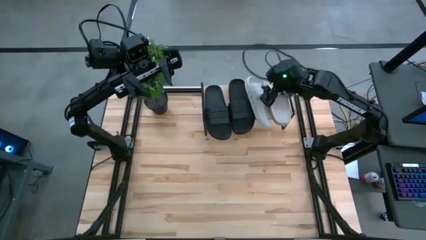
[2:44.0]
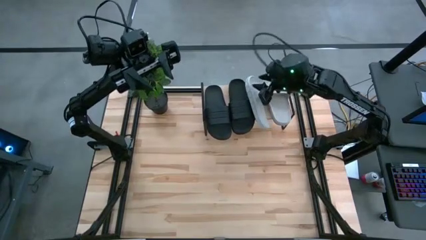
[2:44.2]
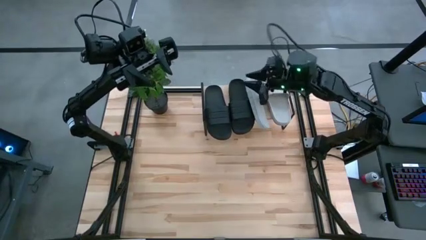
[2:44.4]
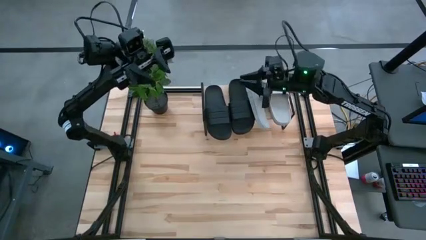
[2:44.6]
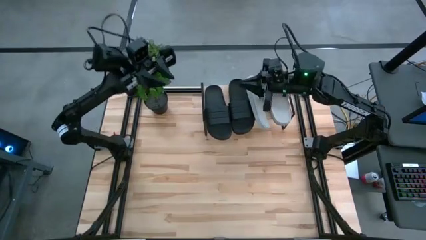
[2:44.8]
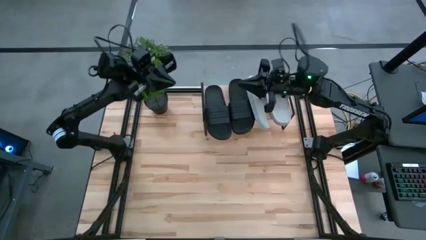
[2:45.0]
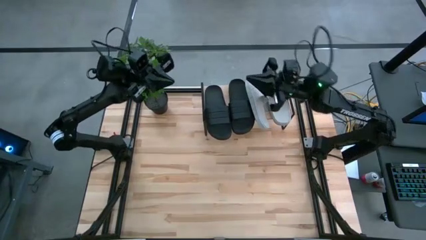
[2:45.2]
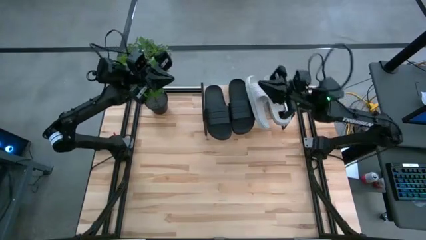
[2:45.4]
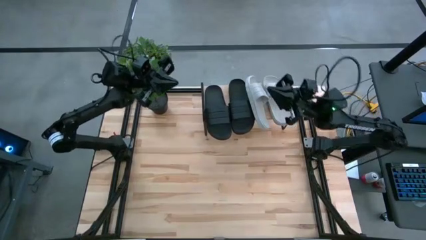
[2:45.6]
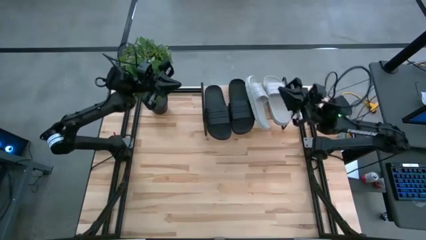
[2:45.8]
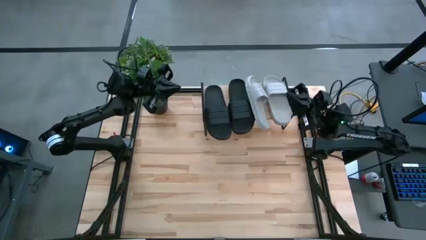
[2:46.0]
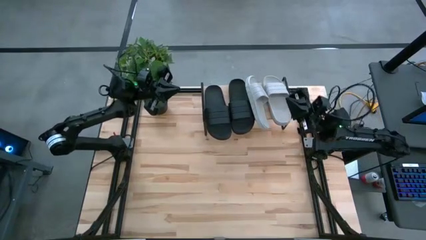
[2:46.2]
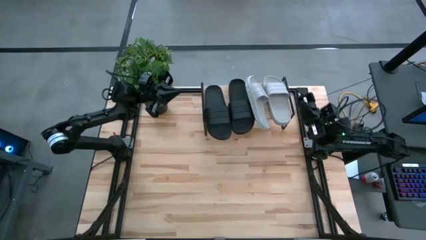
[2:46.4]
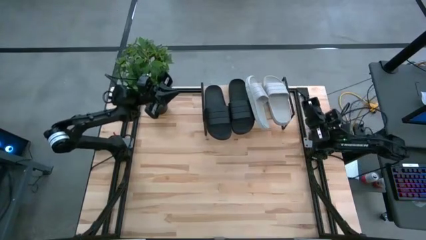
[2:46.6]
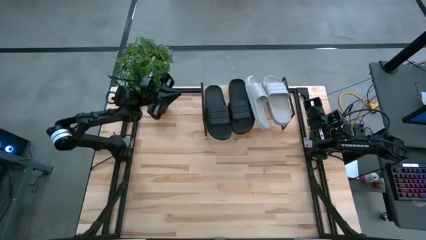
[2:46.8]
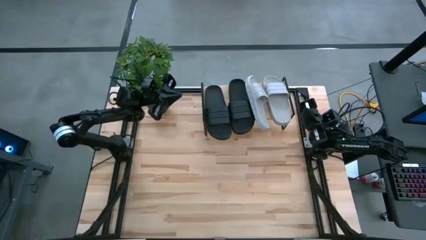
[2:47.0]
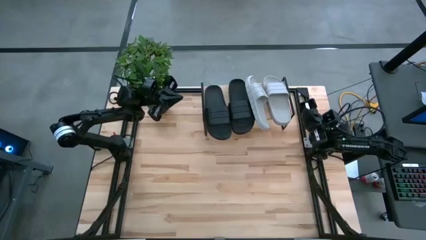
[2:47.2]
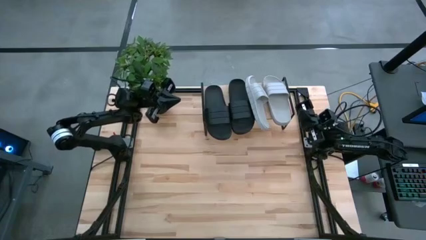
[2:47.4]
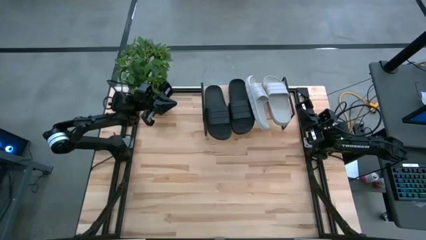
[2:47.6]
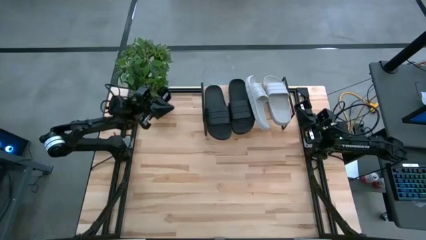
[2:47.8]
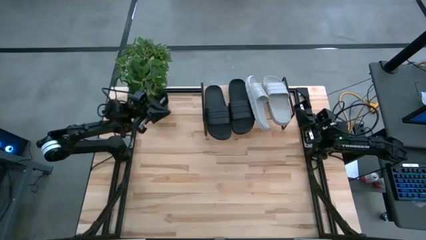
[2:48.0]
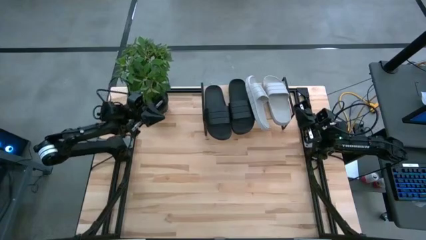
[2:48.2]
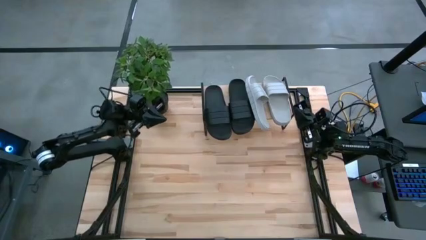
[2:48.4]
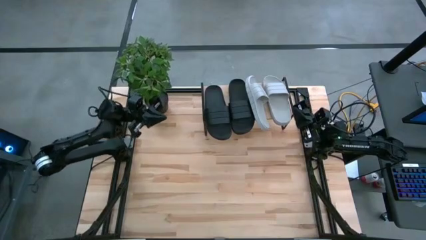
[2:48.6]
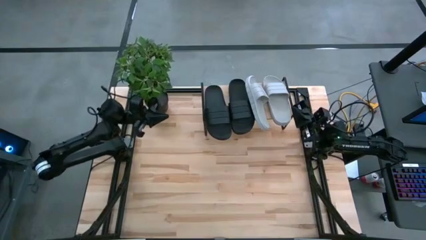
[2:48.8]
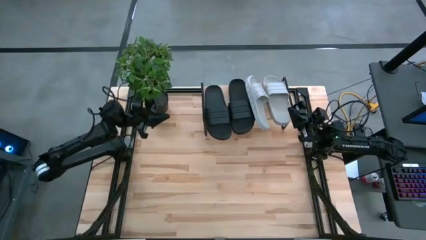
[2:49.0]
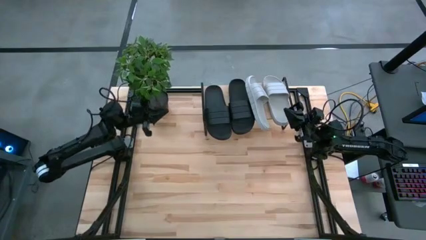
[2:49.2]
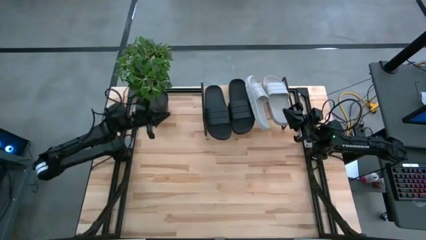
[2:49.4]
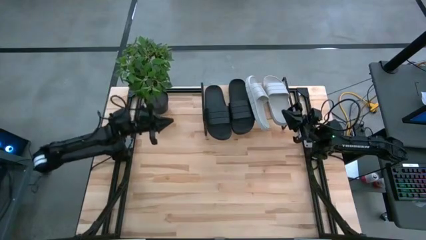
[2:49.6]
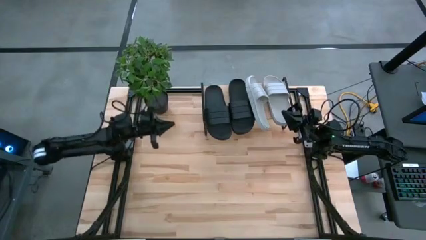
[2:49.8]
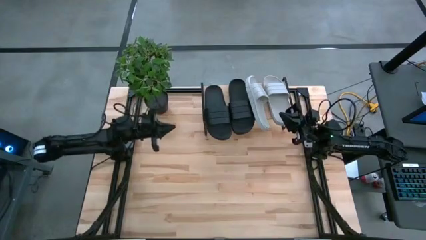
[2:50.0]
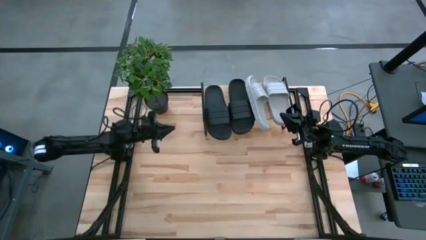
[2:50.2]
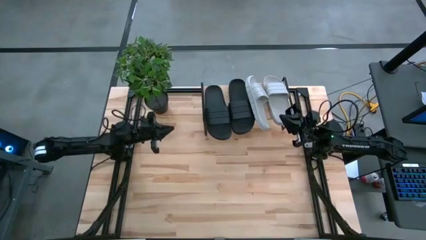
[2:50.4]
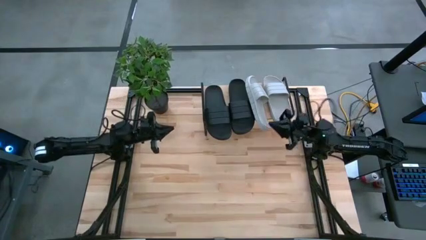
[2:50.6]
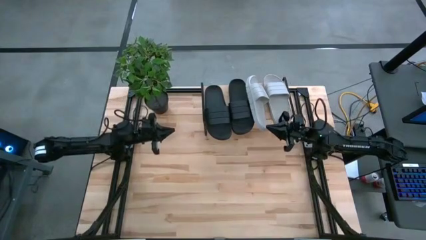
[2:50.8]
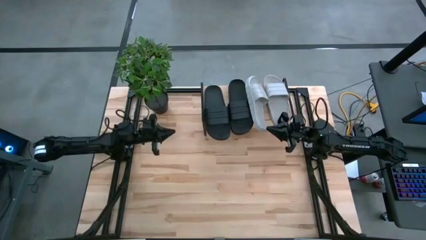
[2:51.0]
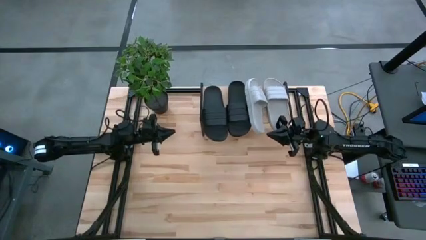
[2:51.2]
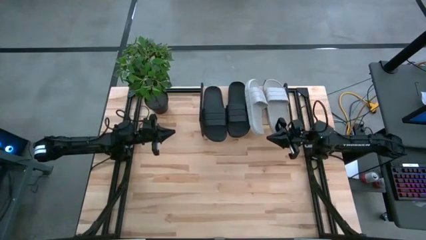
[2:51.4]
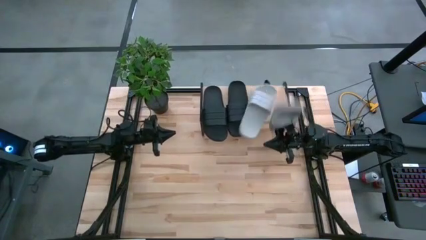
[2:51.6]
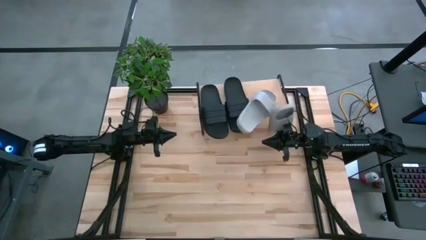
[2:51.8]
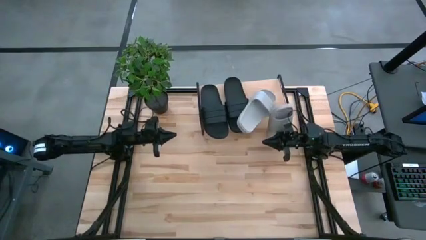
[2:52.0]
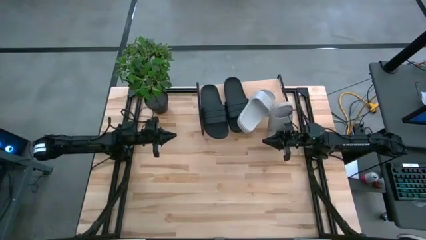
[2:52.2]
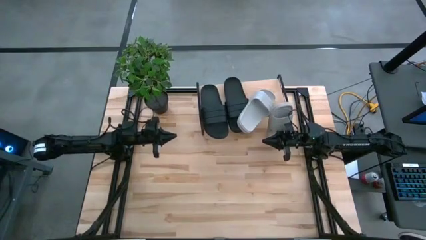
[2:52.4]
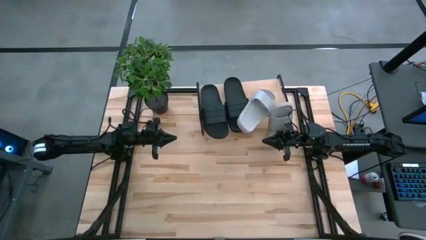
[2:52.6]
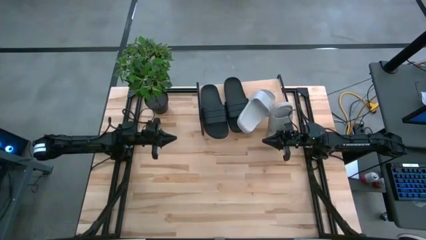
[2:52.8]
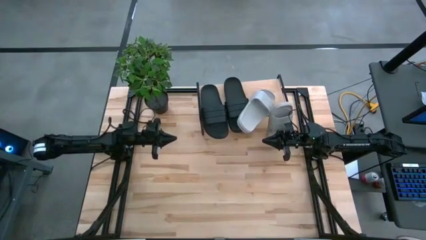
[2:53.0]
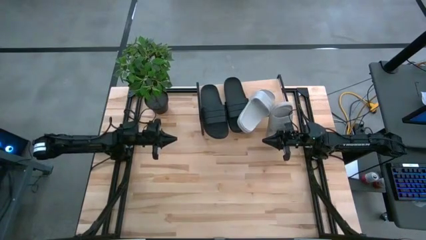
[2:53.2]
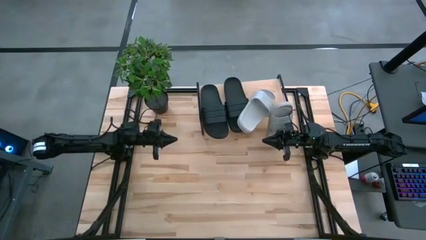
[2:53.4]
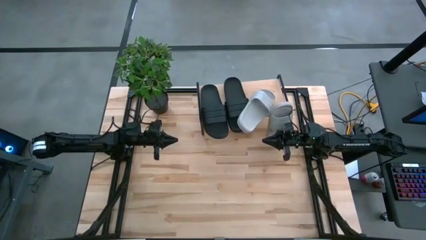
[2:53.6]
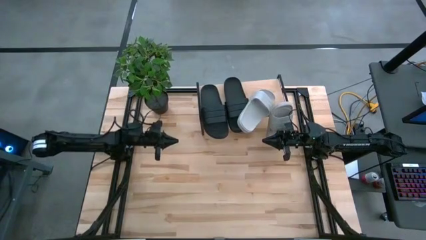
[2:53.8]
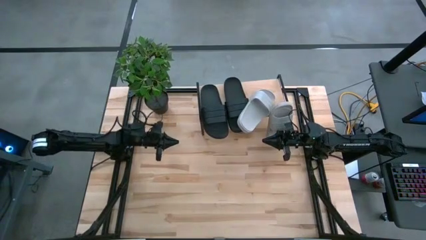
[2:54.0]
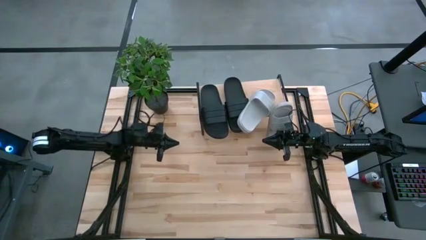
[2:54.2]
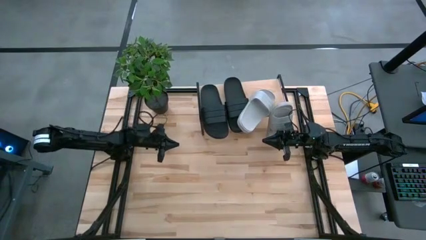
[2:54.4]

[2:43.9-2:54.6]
Task: Pick and place slides into the shelf
Return to Home Position

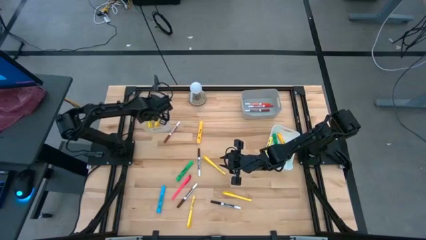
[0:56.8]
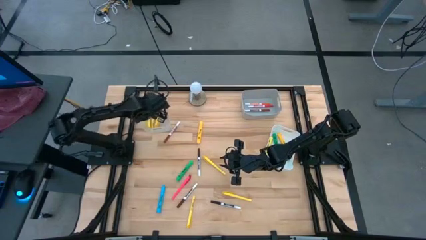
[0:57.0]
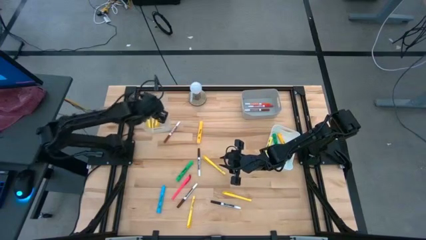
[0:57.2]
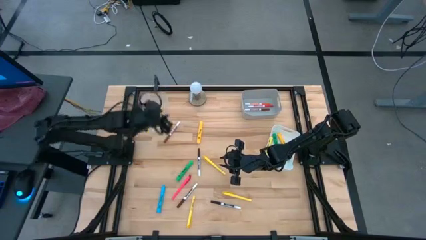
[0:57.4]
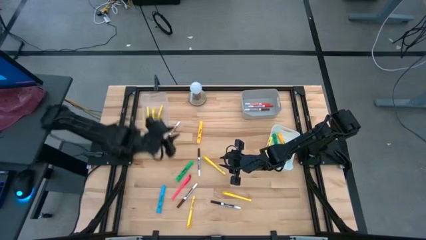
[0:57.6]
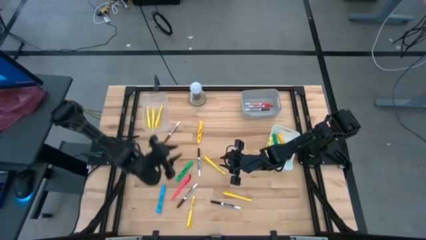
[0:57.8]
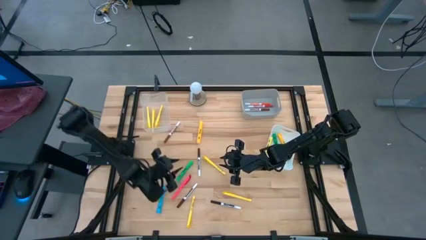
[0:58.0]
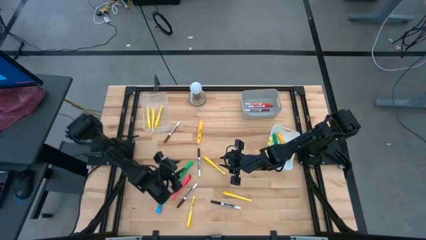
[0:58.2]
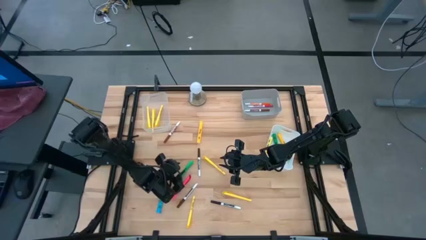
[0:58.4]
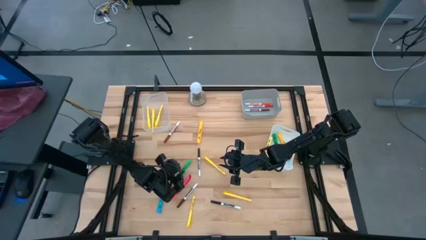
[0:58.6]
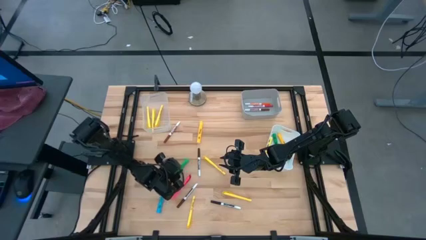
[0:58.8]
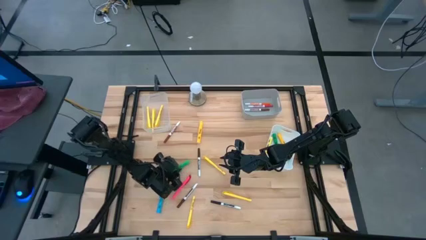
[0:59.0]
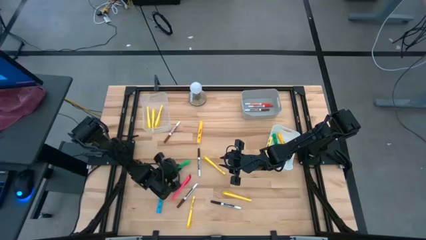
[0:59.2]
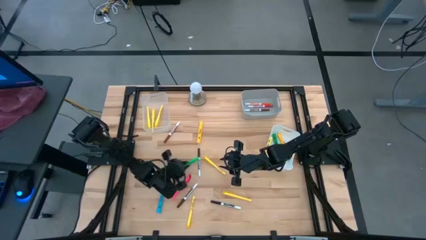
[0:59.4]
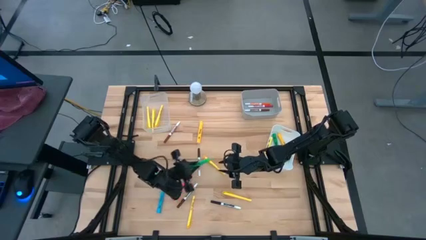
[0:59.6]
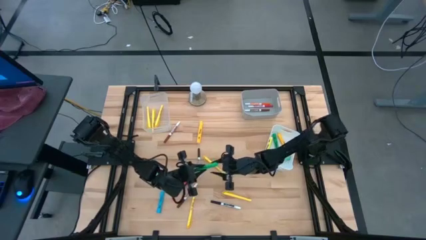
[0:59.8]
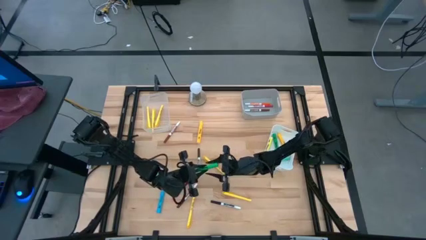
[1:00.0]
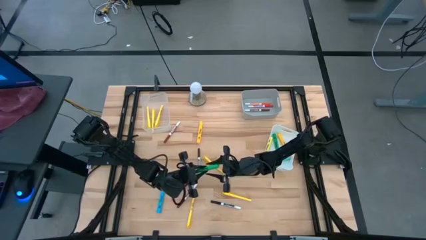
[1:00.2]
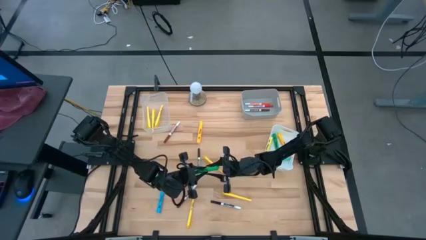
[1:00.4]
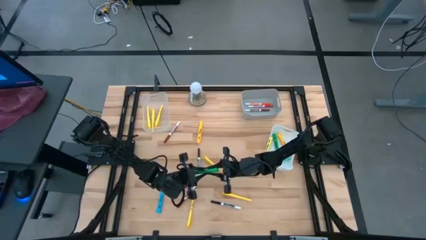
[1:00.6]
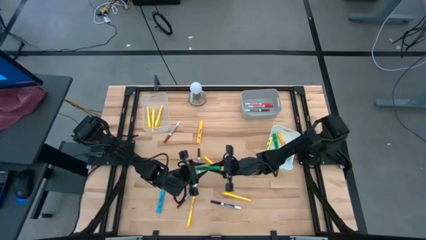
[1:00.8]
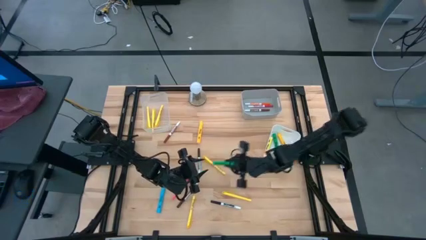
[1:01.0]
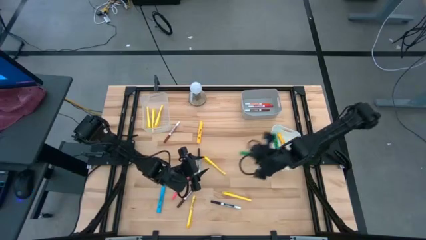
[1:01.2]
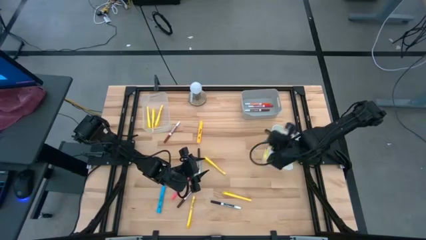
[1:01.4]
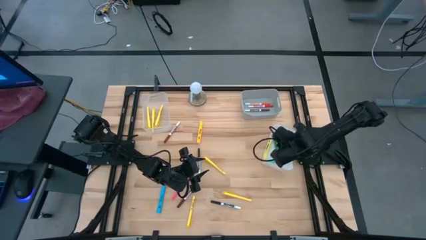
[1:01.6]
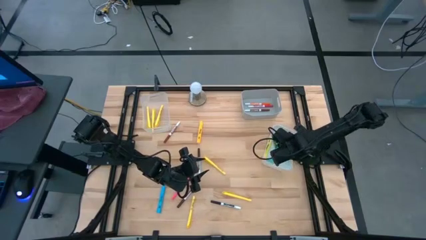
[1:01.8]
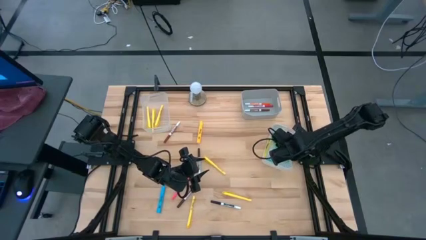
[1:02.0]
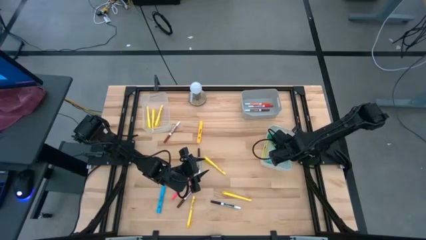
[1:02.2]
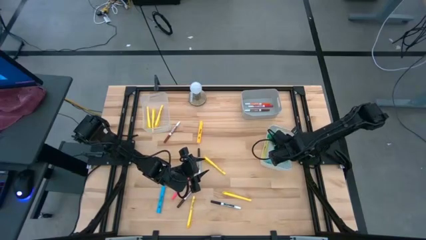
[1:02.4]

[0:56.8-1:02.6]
Task: Pick & Place Markers
Put the green highlighter pen into the white bin
